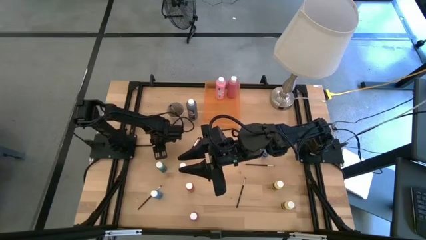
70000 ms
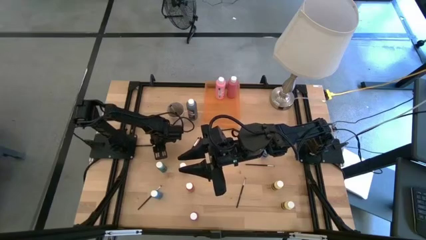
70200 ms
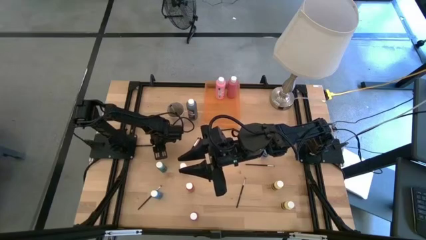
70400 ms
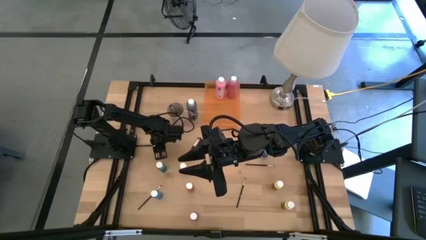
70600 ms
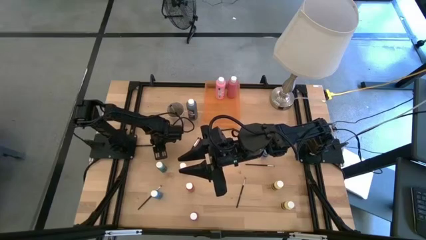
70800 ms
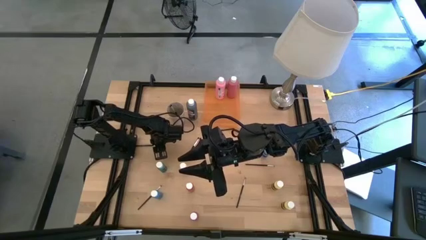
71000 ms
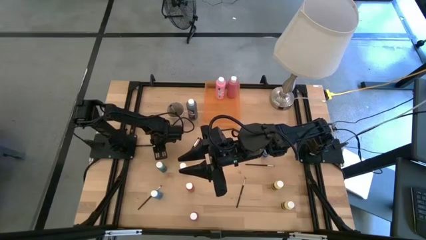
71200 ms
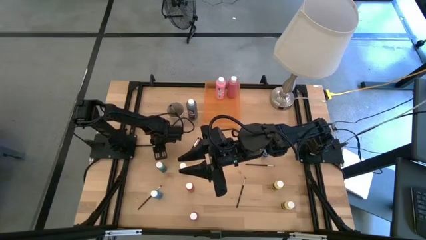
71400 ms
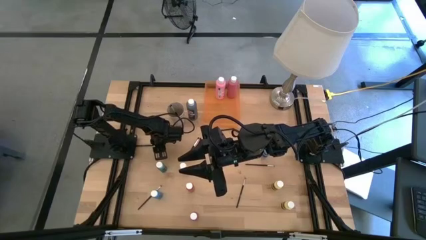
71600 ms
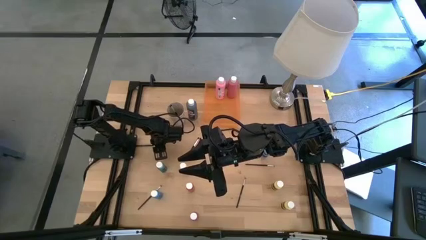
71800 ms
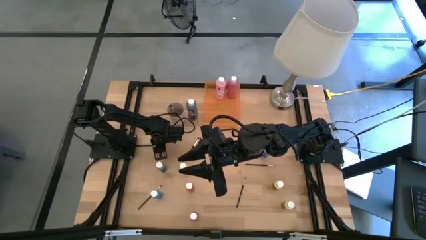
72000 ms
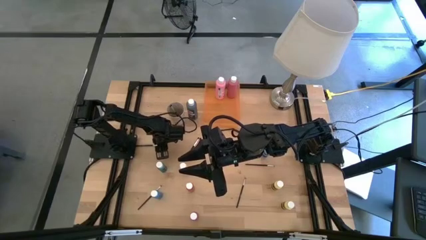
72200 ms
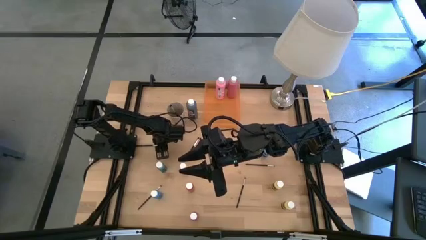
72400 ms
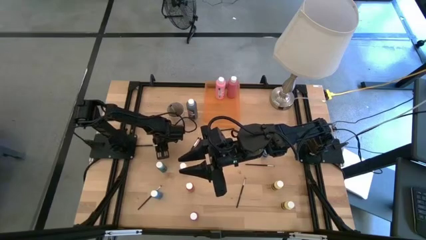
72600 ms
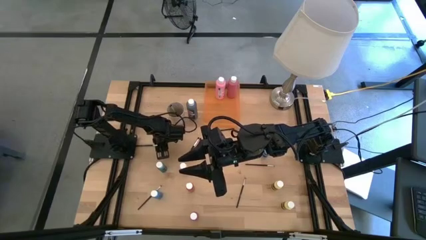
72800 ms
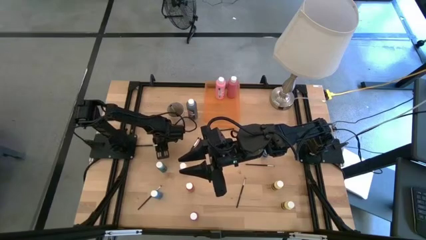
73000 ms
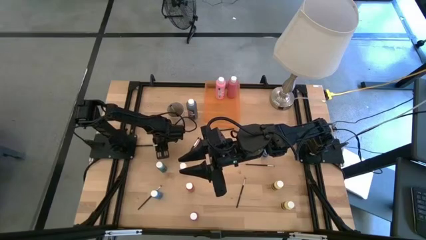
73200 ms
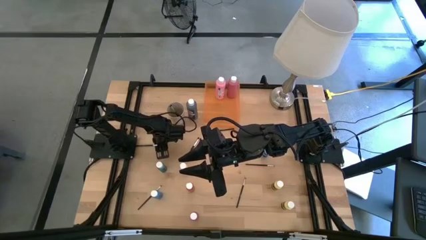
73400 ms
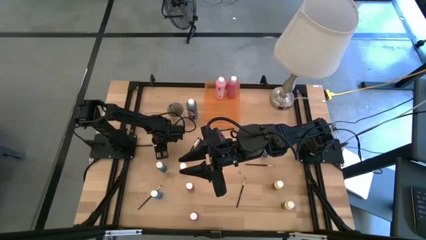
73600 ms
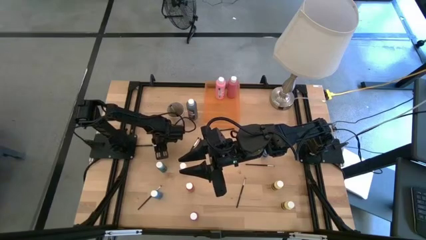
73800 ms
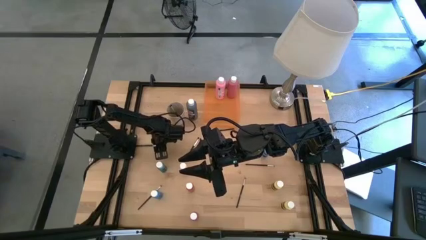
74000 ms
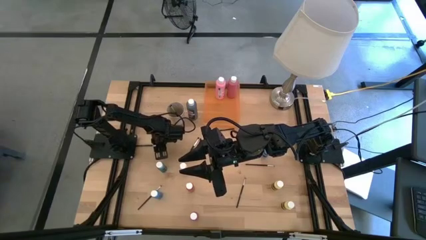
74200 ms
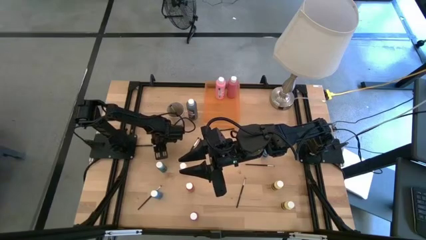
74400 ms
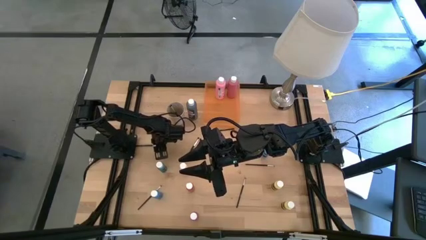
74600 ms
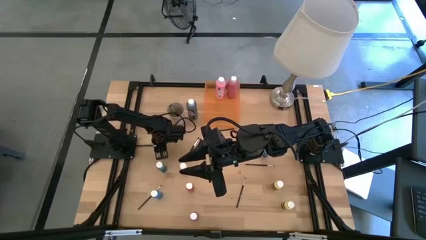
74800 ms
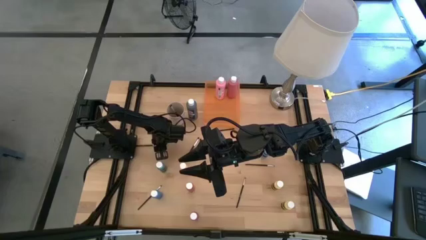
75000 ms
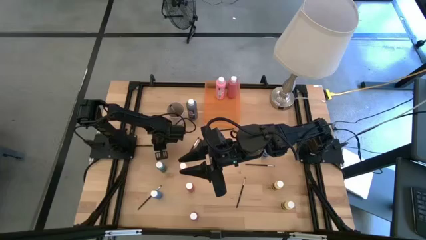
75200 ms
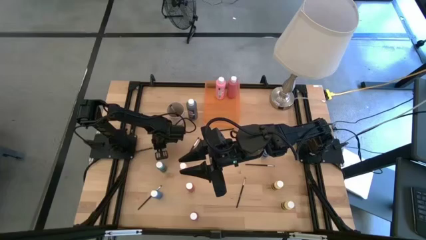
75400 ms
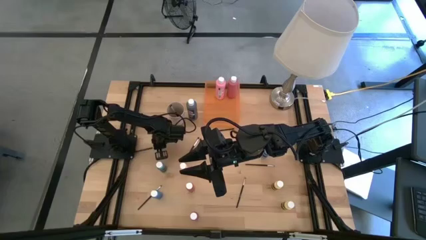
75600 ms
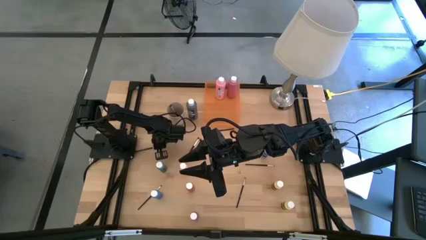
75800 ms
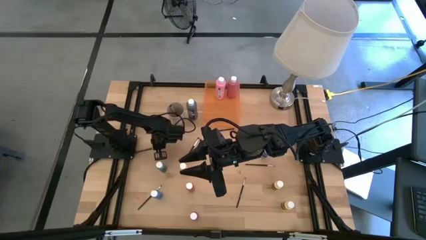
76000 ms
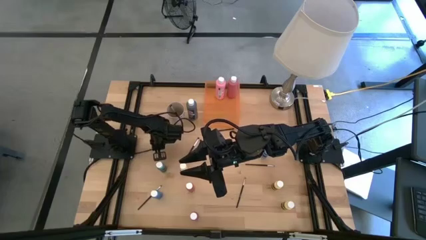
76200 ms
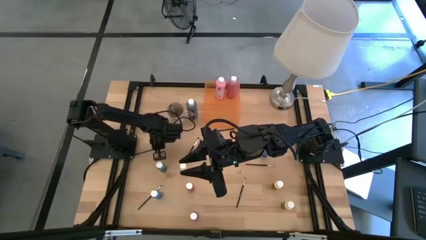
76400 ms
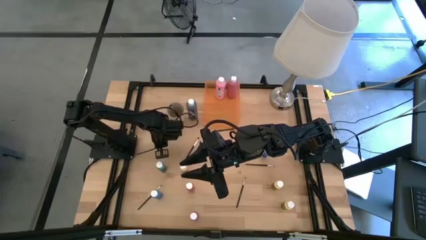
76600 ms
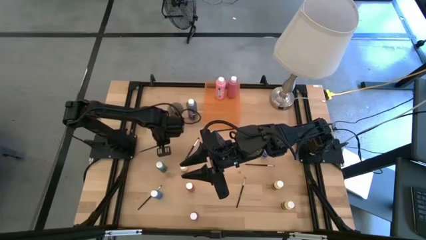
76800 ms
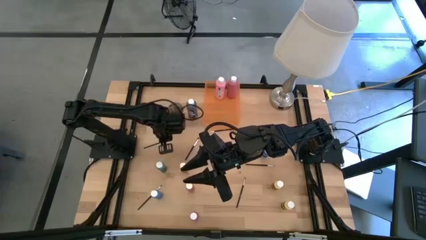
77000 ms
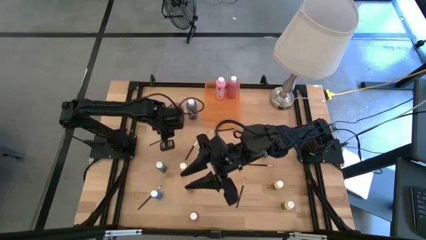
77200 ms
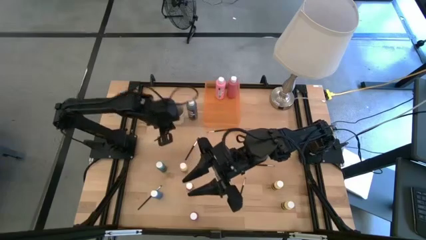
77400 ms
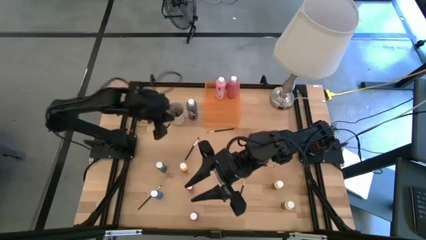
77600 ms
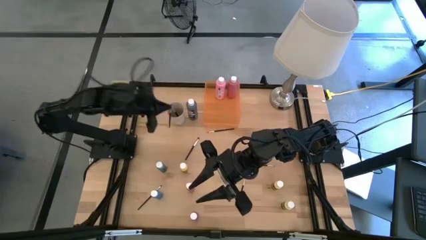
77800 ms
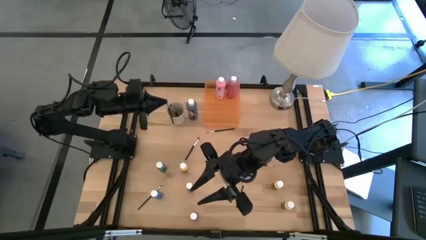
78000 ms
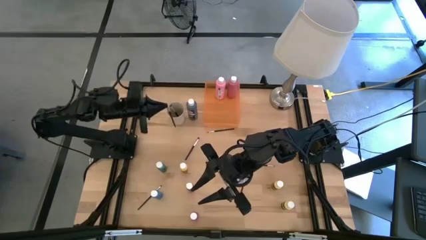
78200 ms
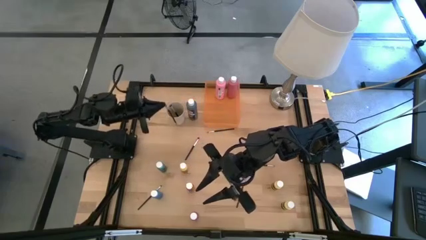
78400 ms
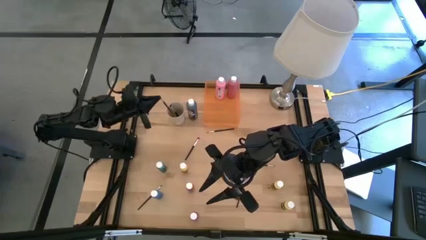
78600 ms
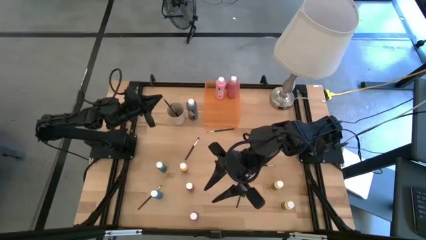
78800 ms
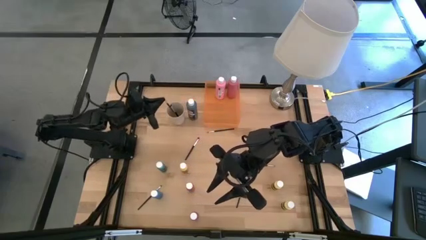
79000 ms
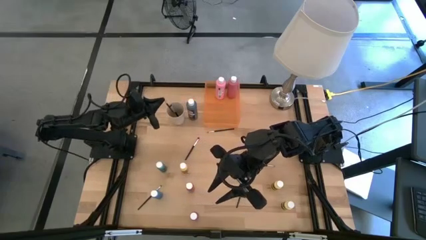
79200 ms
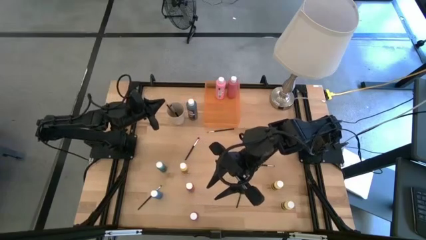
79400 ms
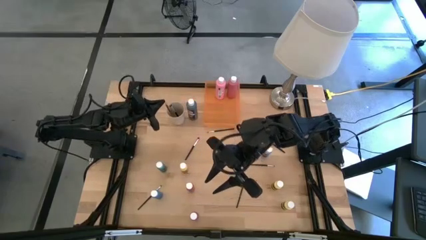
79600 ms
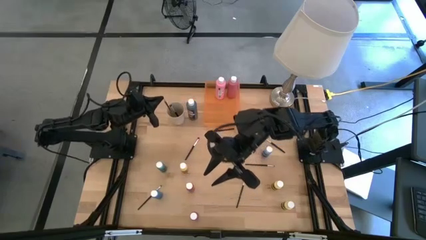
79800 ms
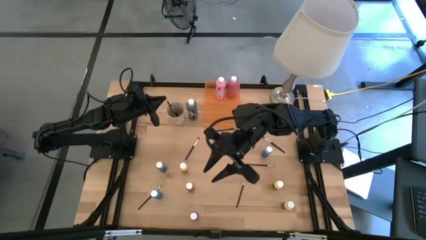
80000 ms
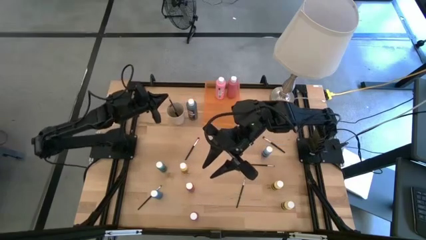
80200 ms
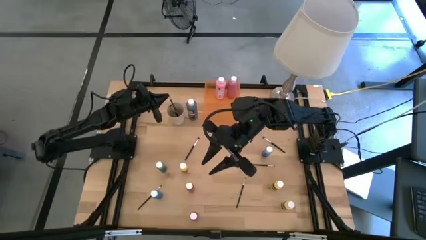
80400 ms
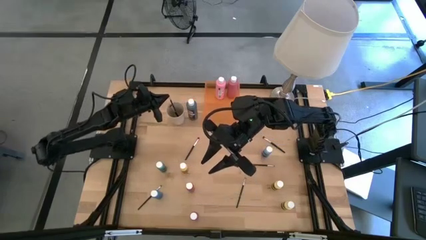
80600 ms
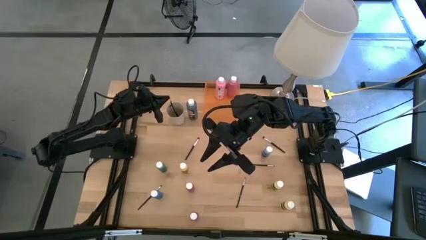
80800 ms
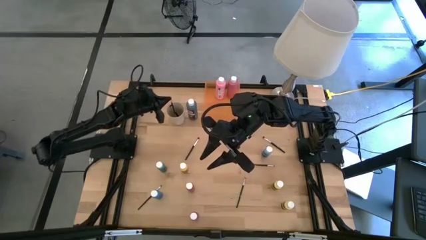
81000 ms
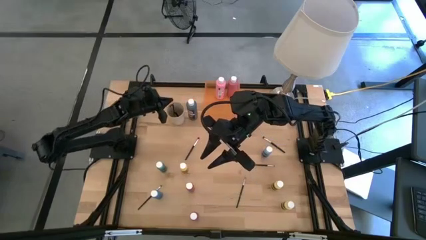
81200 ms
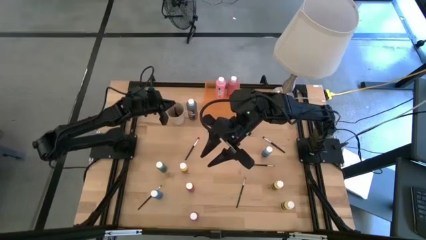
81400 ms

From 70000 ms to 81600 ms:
Task: Pick & Place Paint Supplies
Put the black paint brush into the white cup

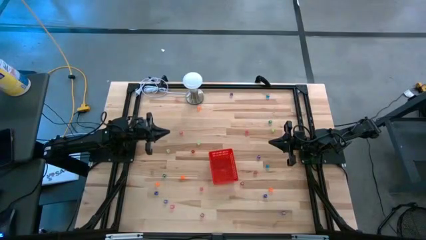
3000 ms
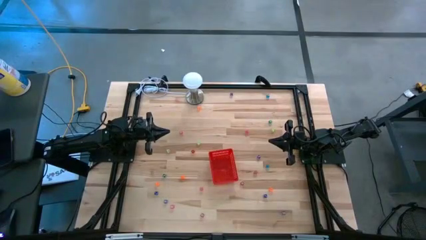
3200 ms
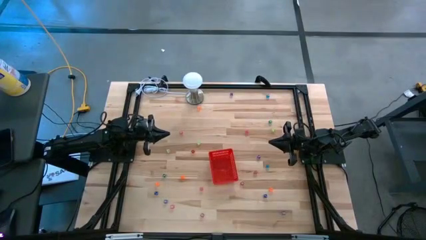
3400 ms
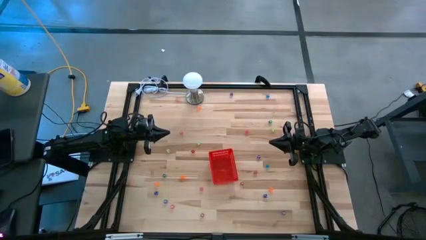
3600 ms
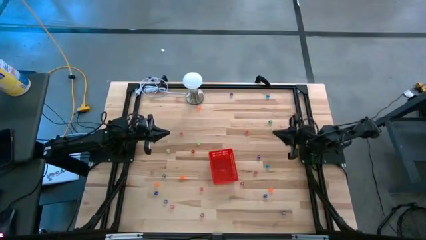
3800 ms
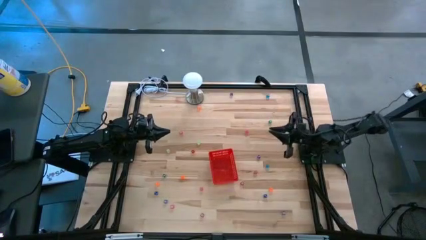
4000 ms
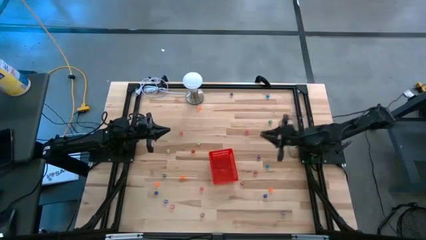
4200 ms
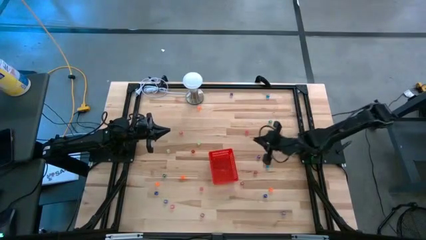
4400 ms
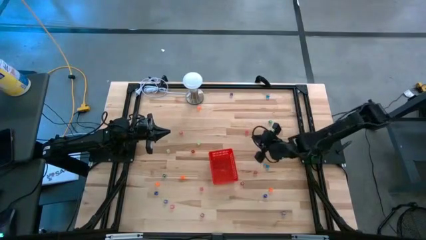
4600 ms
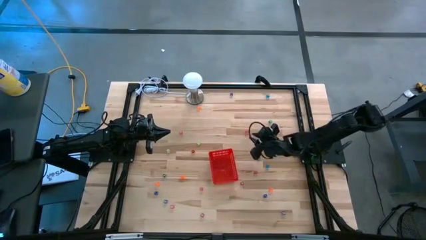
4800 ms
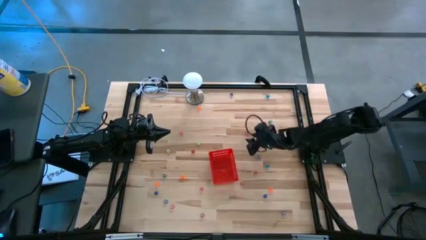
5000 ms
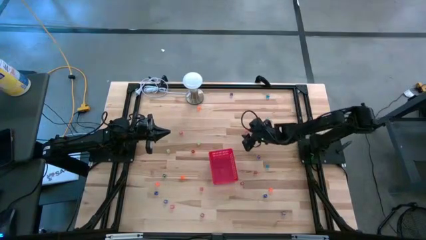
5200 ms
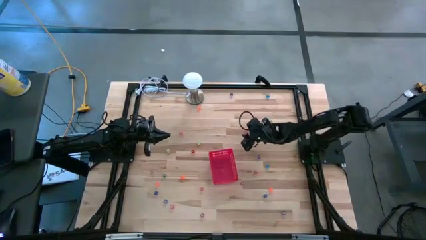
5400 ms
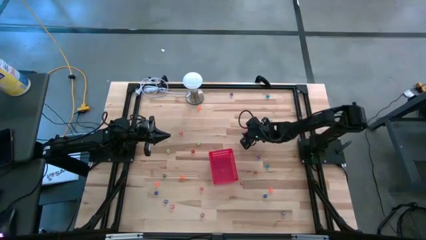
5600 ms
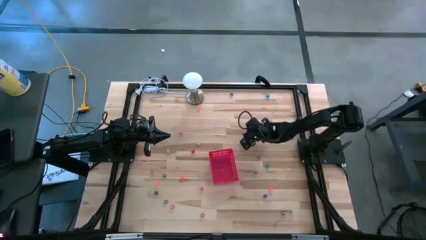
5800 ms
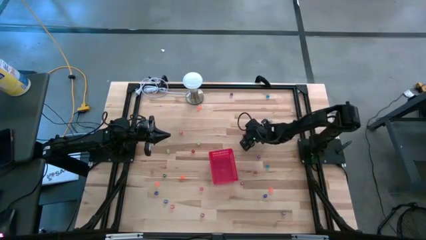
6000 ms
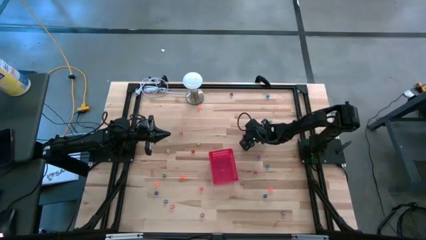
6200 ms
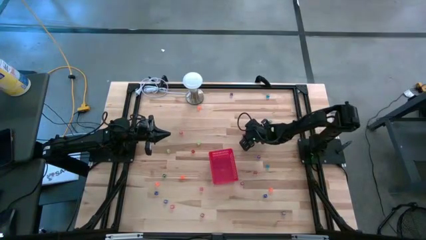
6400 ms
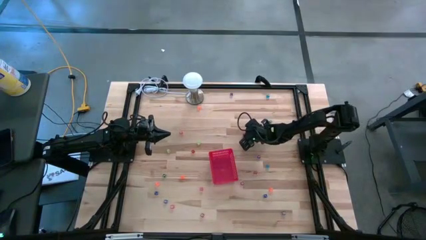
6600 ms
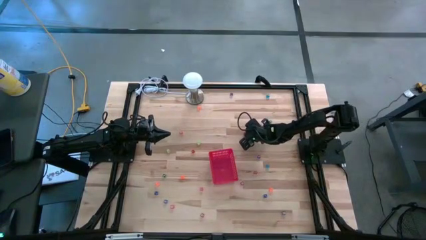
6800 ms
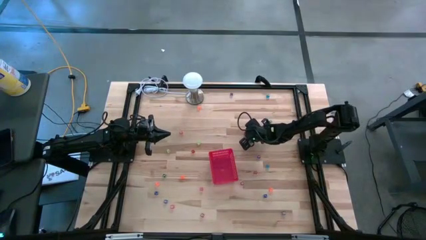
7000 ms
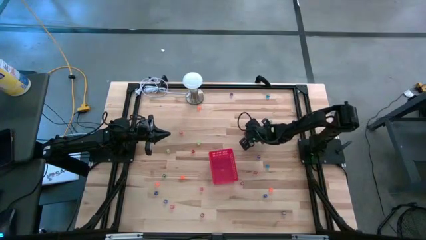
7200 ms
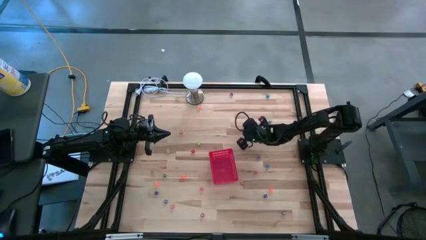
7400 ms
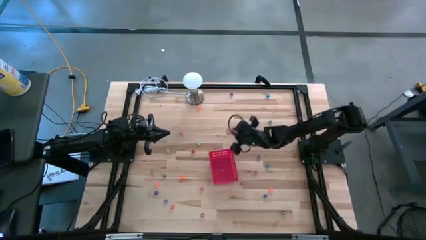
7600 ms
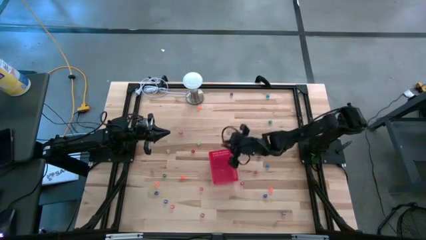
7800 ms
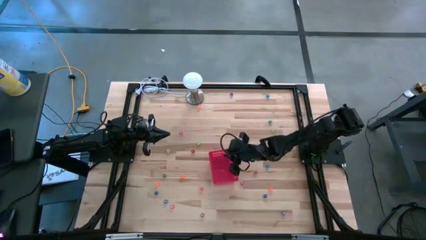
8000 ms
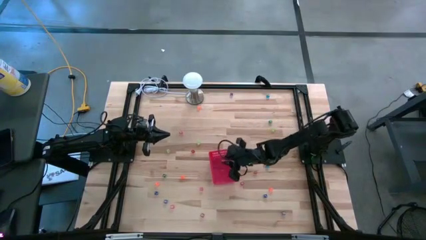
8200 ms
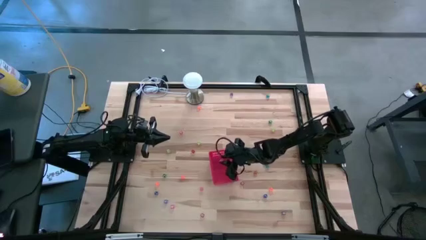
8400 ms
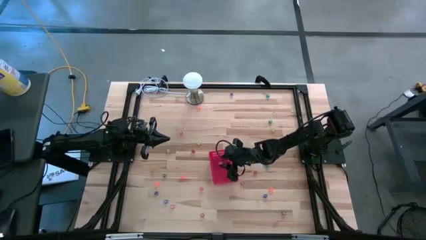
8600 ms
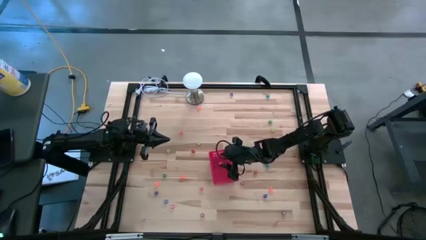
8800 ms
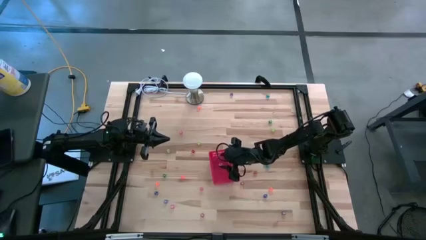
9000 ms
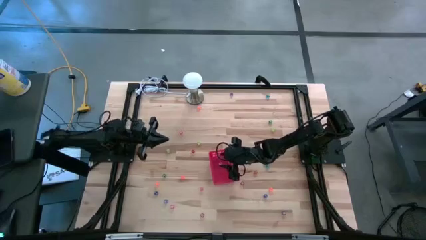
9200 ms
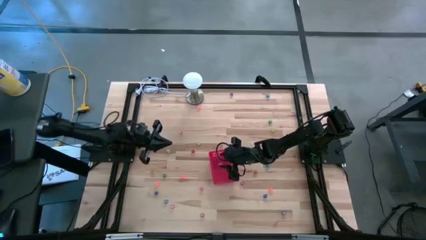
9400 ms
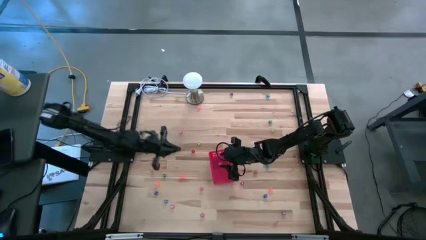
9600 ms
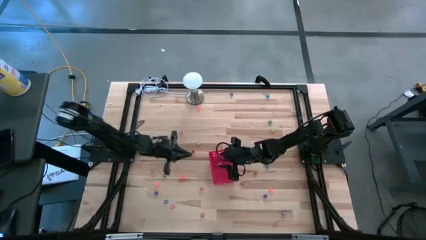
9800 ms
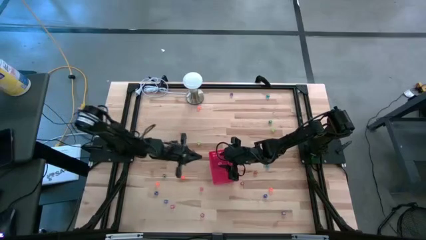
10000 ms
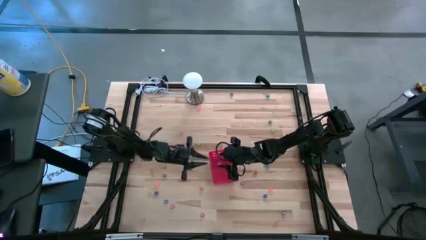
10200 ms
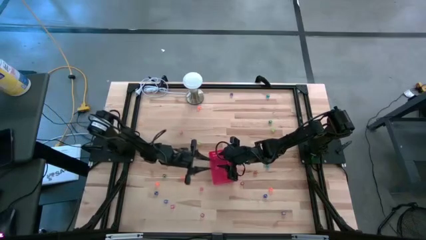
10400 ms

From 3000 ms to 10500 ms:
Task: Pick & Place Dice
Put the red die into the red basket
